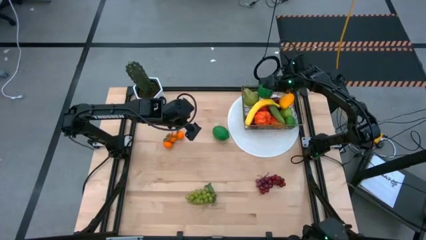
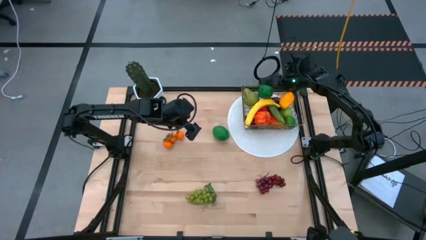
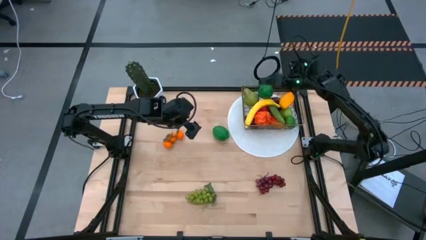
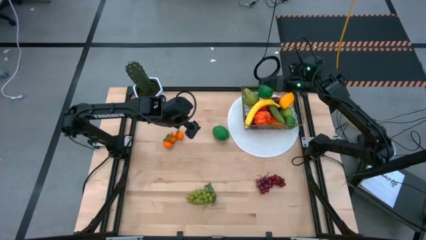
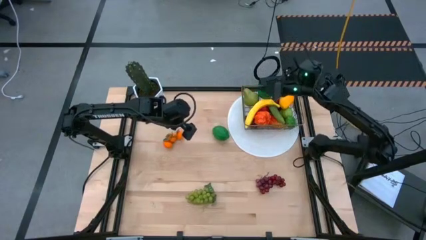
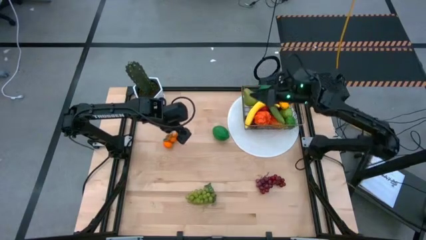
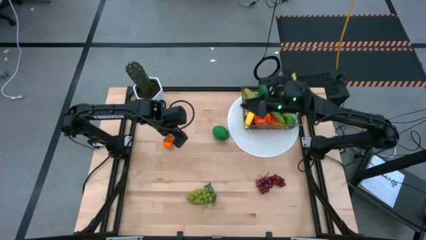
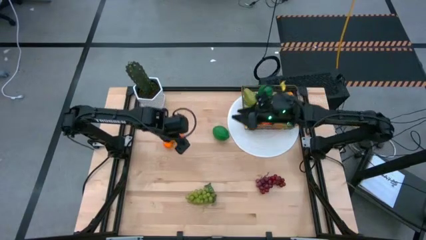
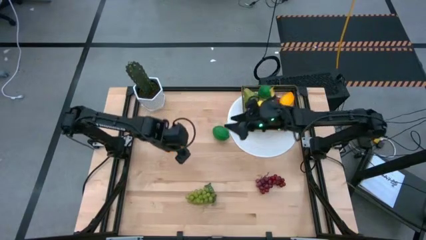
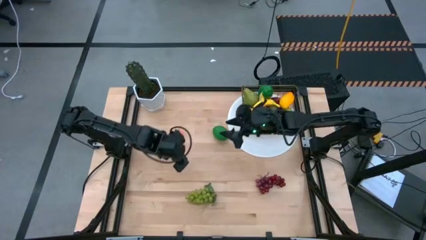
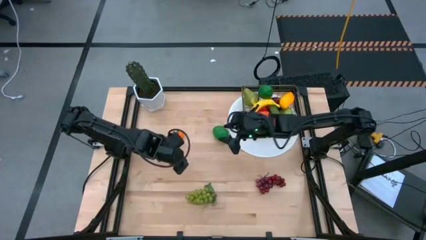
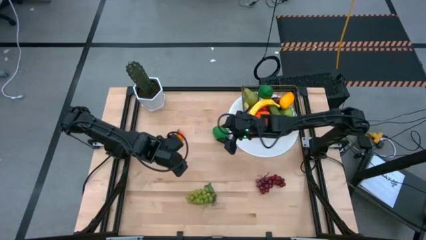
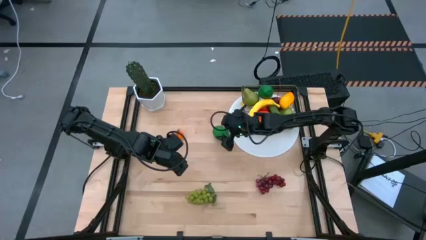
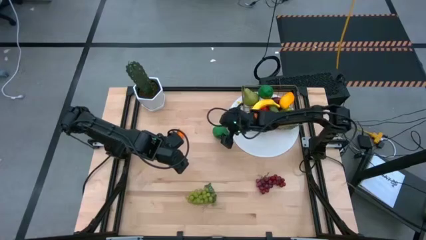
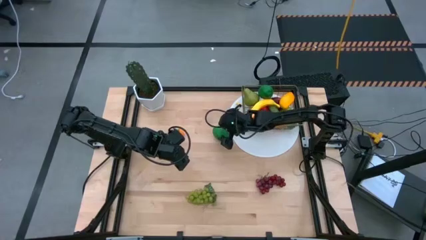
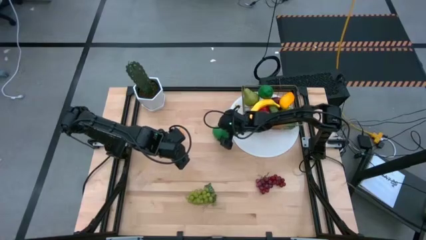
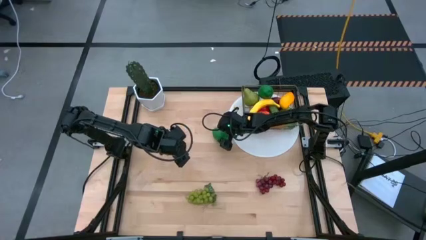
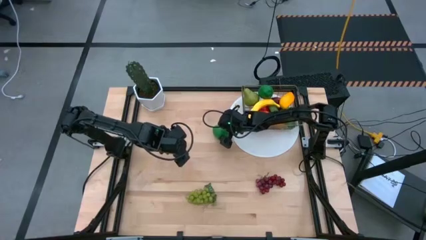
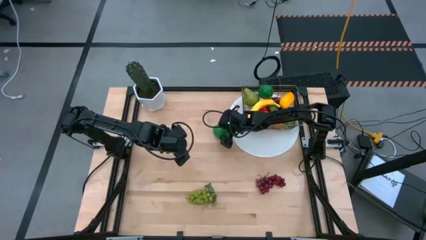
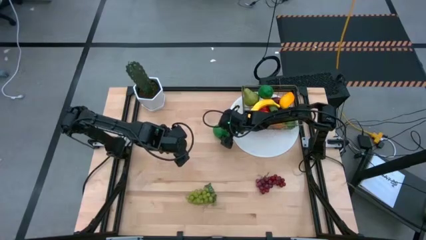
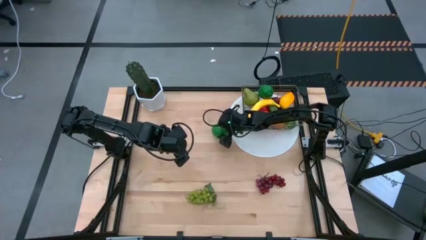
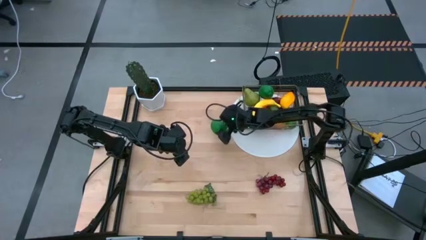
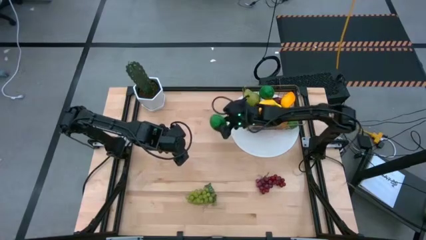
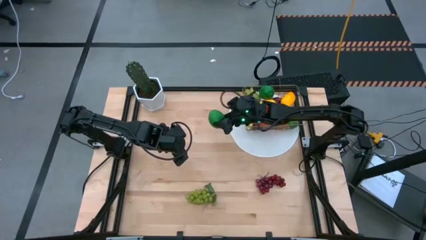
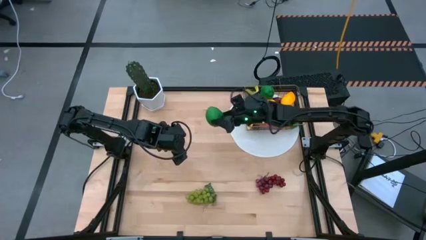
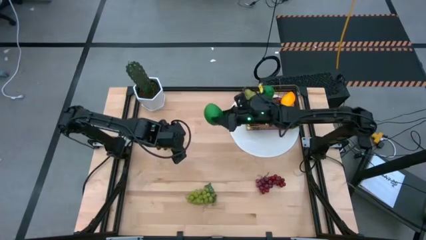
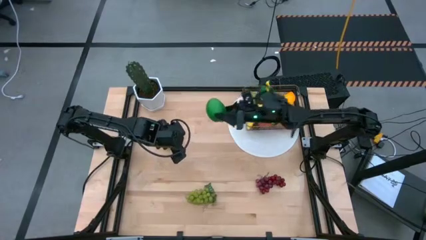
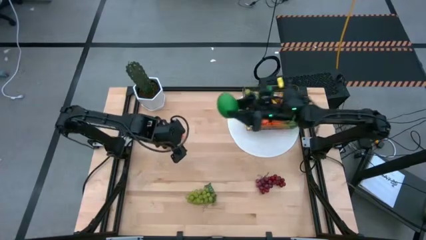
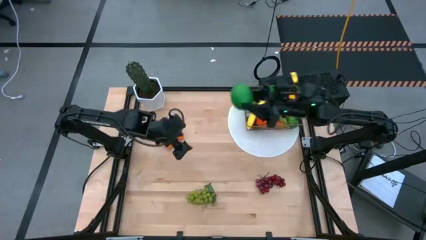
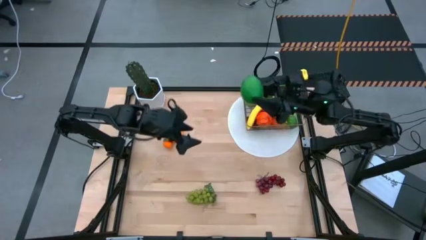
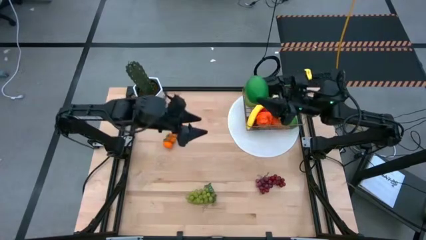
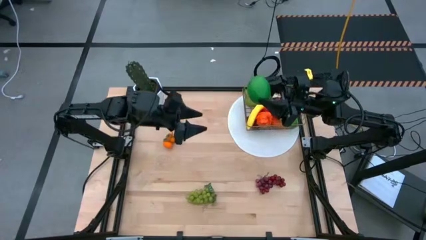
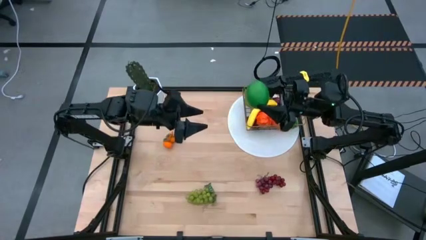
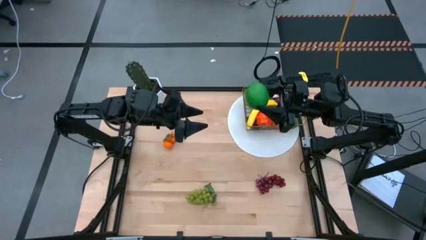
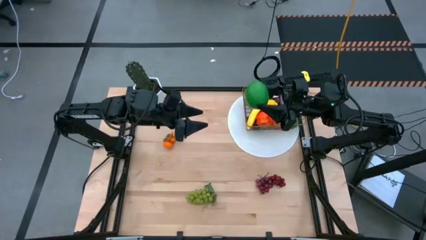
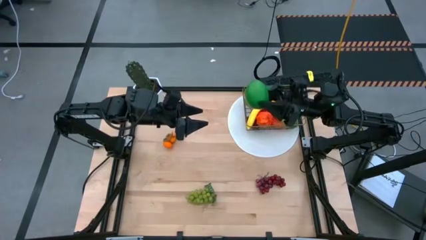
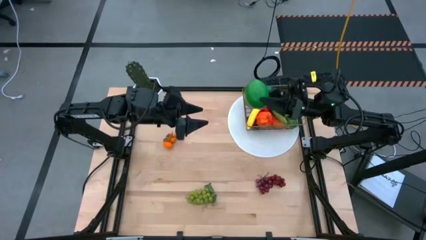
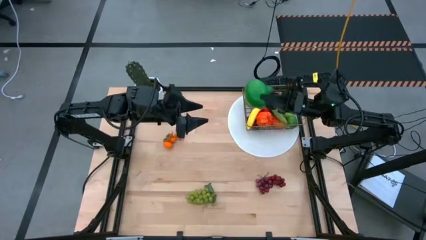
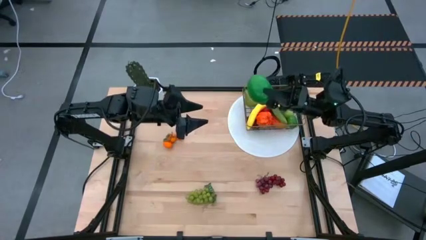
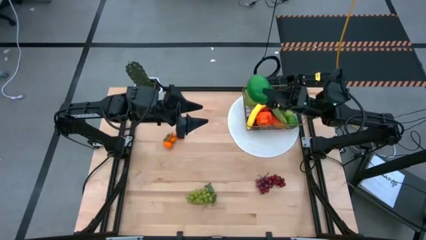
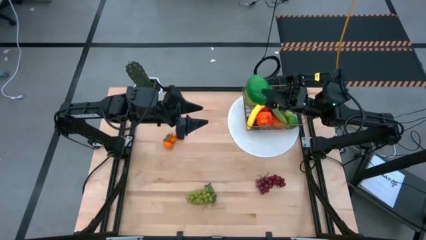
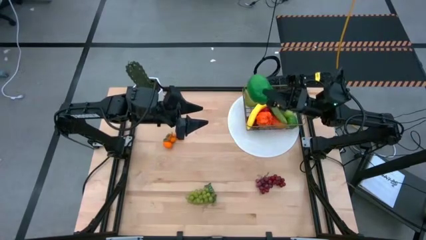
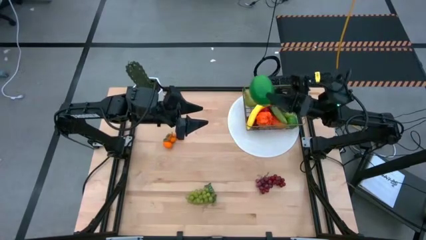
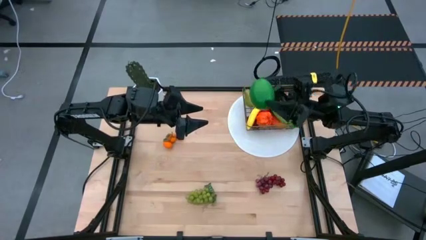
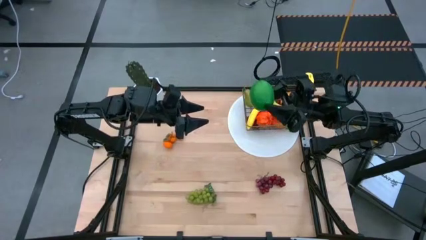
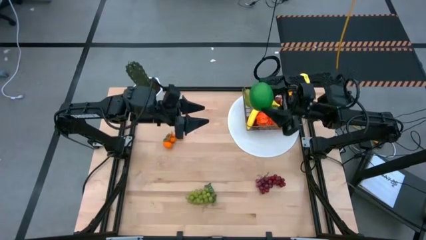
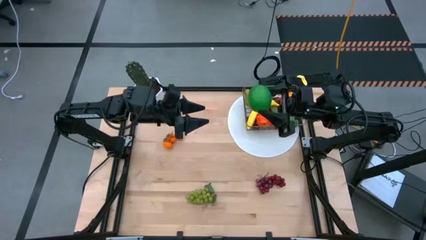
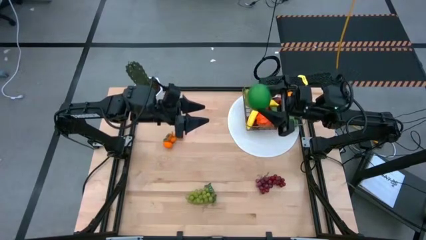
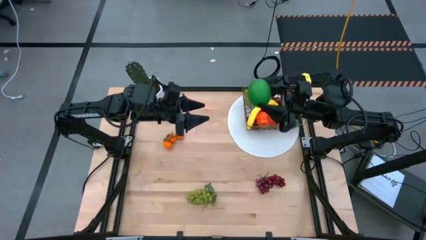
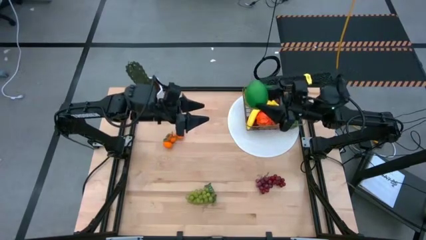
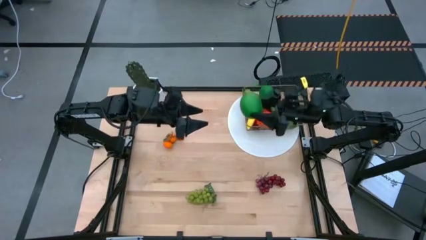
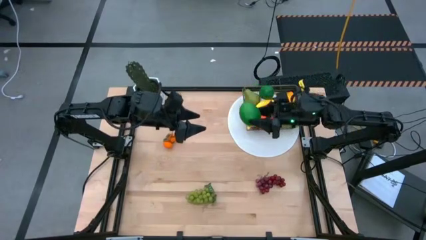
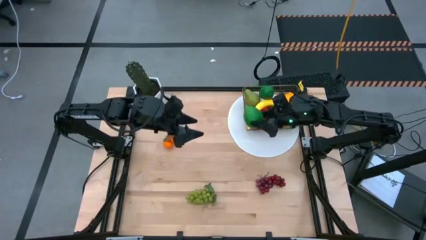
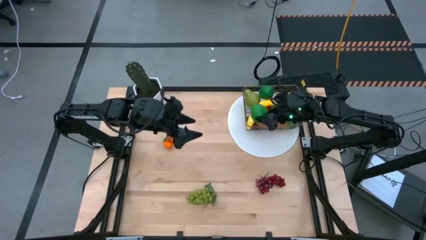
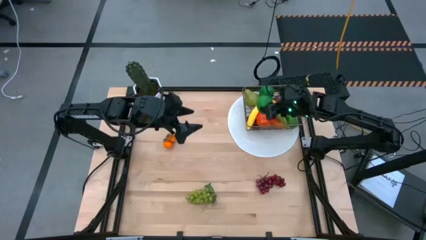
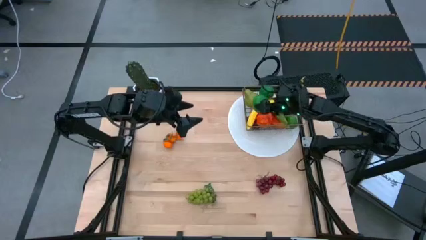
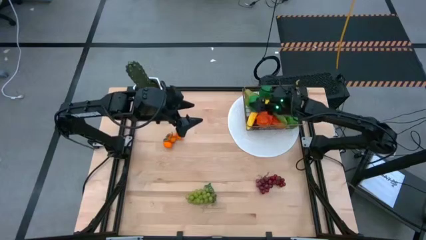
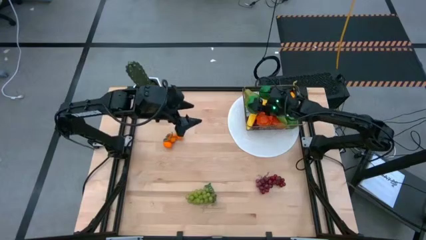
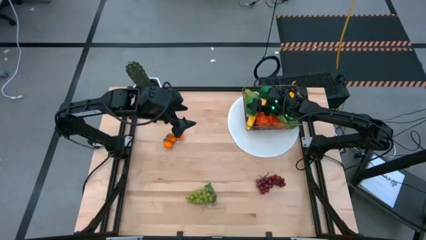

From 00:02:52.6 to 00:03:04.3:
Task: Build produce basket
Put the green lime into the gold wire basket
